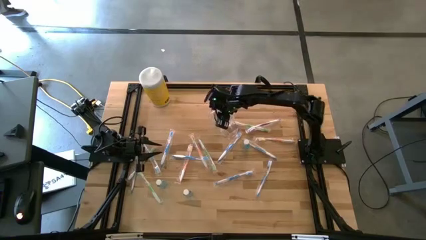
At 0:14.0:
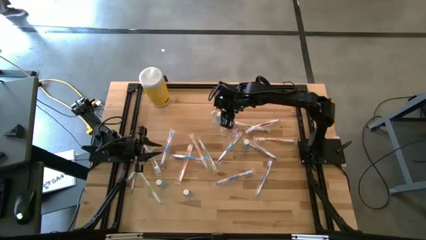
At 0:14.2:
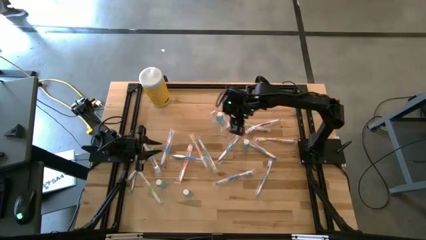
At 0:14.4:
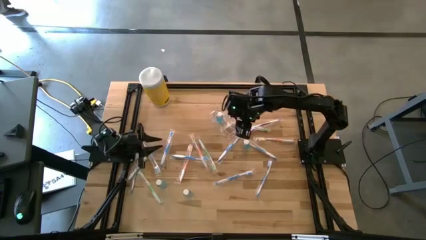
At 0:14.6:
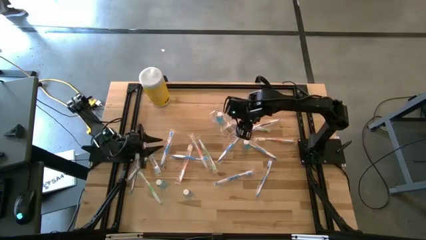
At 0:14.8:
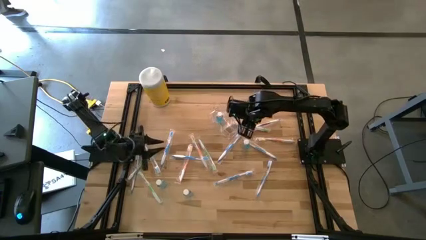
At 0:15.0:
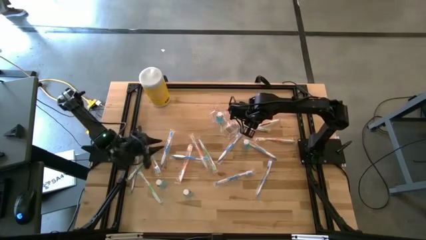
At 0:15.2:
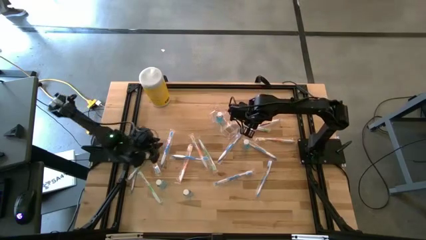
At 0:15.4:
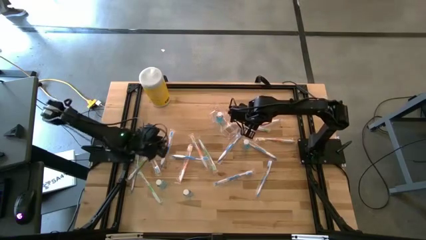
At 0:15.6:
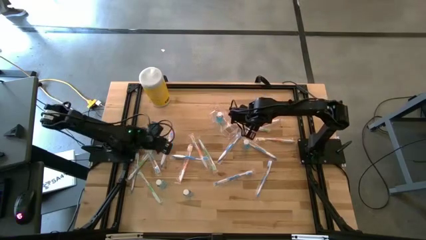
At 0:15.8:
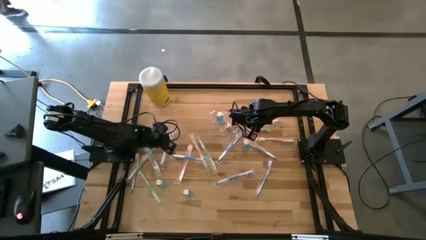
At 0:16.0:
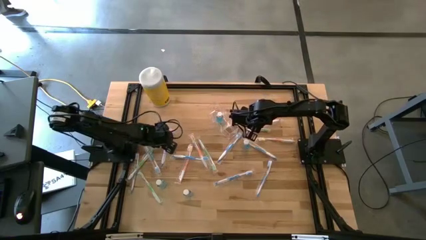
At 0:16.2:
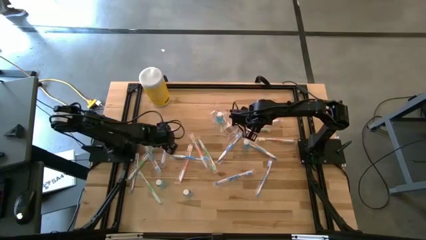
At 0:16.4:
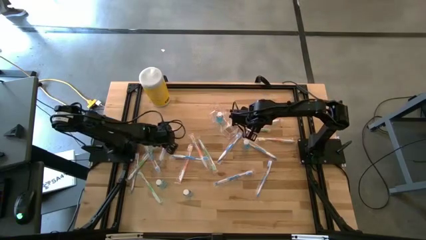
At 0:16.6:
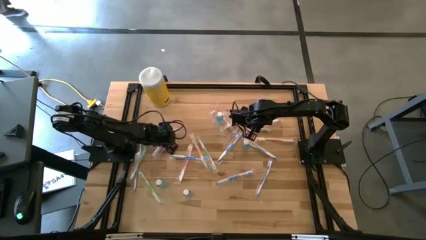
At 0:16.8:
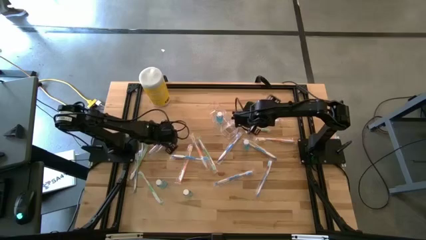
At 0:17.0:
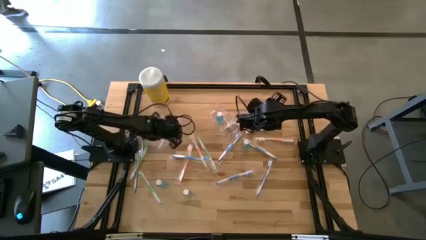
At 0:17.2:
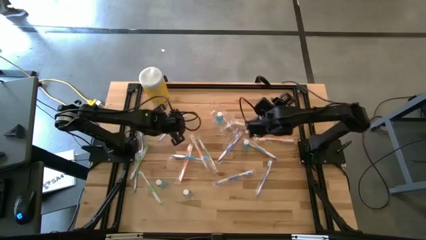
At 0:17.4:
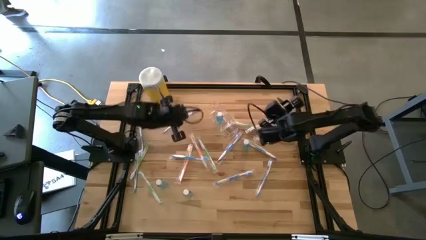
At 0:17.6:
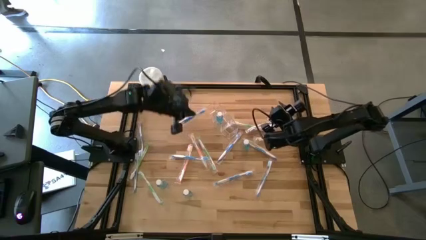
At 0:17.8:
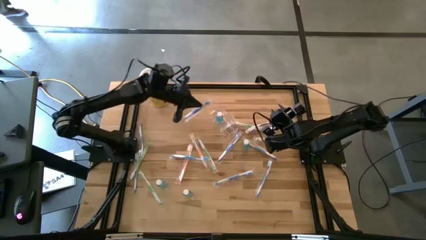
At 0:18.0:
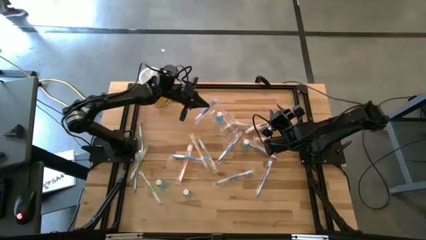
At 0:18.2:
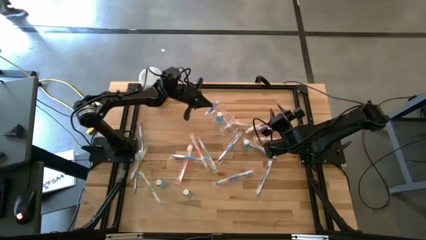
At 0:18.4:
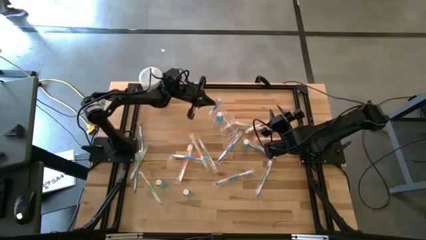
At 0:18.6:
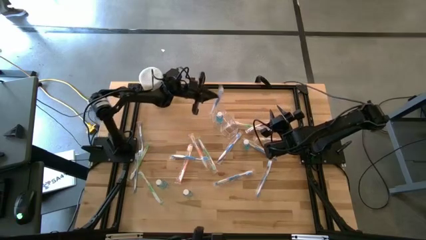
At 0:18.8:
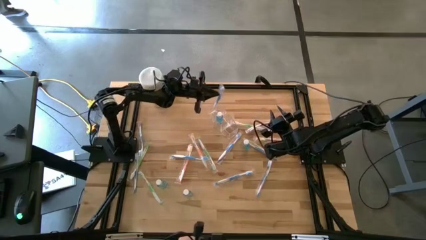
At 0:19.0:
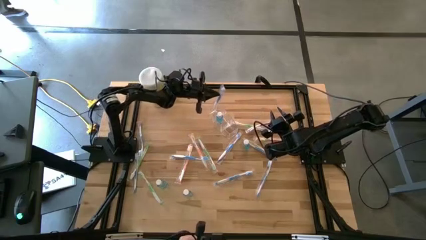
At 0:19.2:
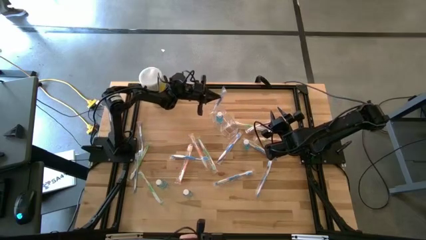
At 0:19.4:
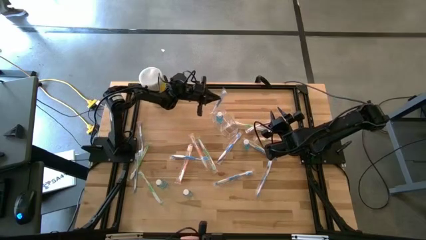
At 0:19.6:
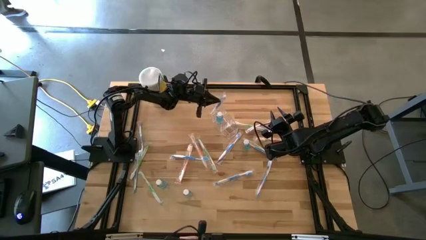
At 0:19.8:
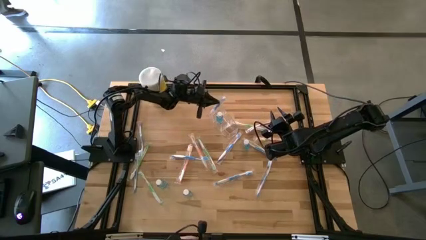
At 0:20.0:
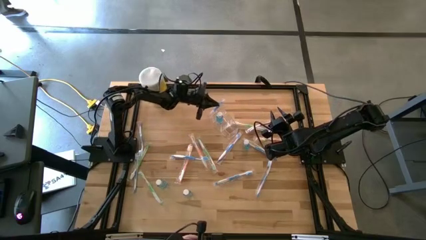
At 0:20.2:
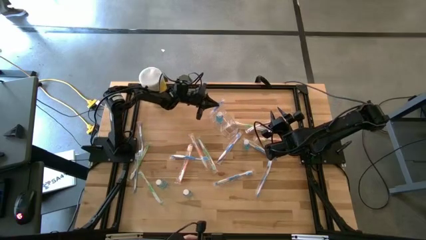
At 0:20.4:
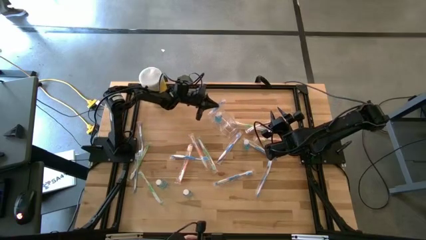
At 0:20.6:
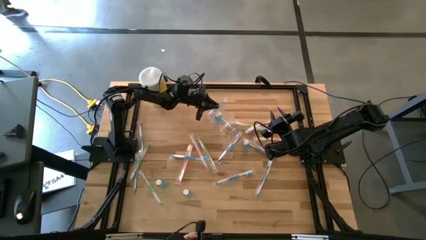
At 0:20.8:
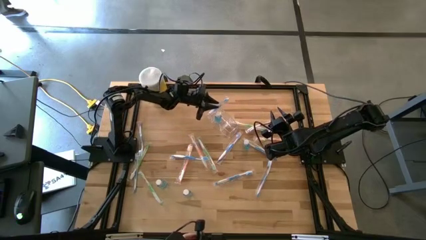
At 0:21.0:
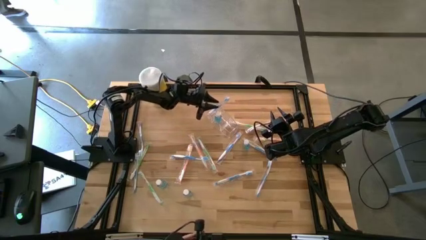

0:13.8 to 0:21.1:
Task: Pick & Place toothbrushing station
Put the blue toothbrush into the transparent organizer

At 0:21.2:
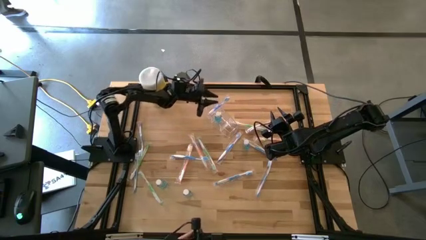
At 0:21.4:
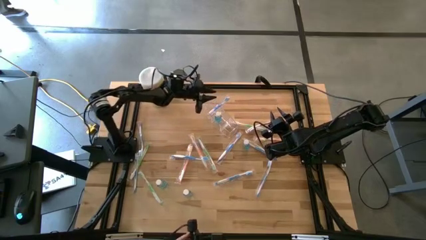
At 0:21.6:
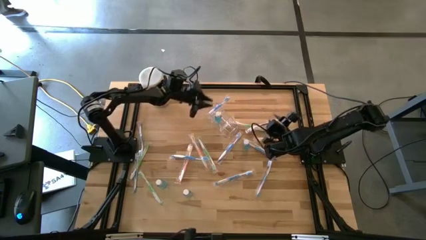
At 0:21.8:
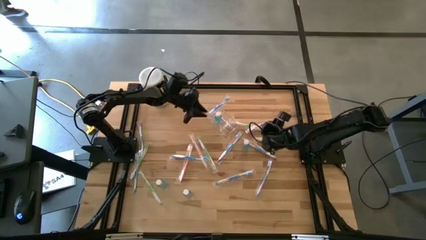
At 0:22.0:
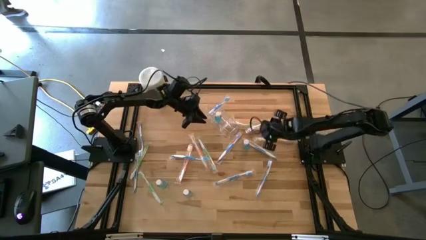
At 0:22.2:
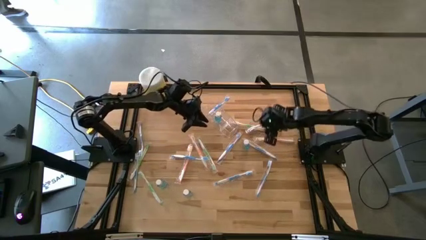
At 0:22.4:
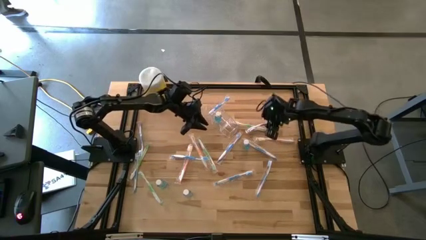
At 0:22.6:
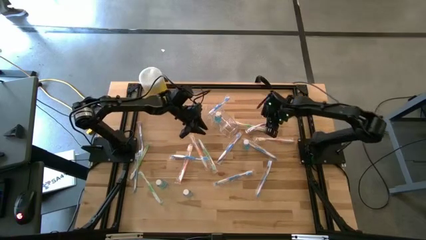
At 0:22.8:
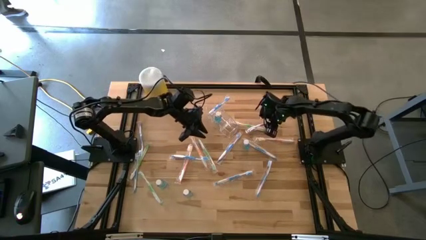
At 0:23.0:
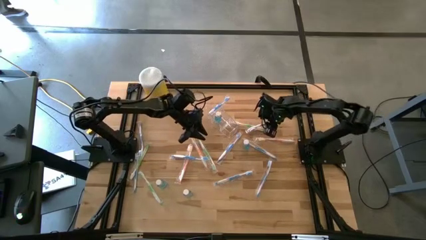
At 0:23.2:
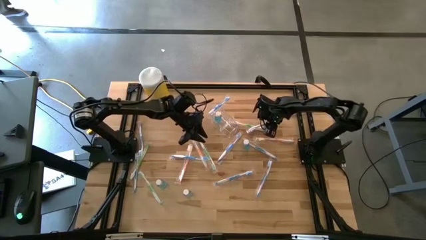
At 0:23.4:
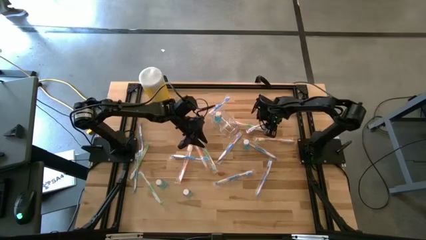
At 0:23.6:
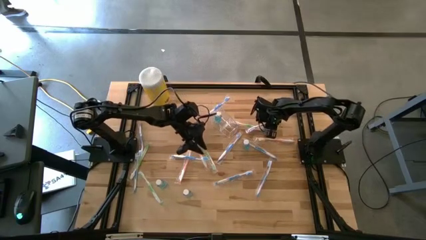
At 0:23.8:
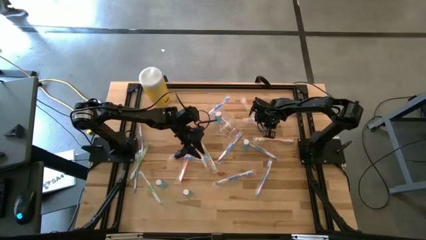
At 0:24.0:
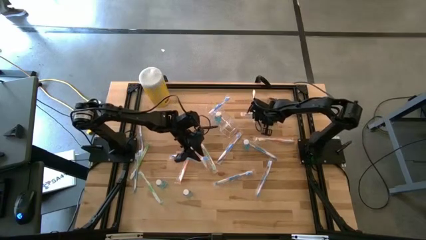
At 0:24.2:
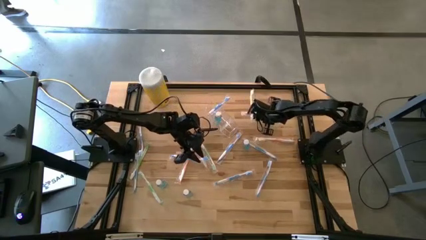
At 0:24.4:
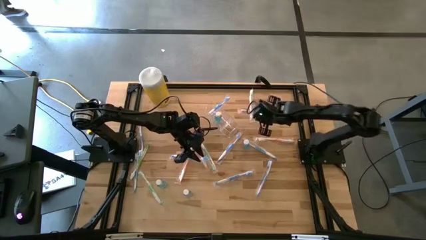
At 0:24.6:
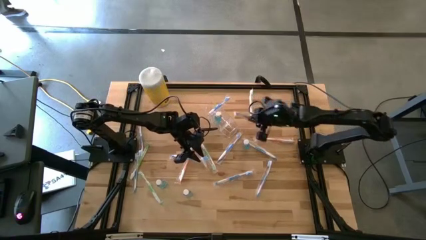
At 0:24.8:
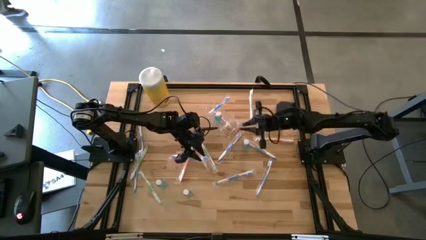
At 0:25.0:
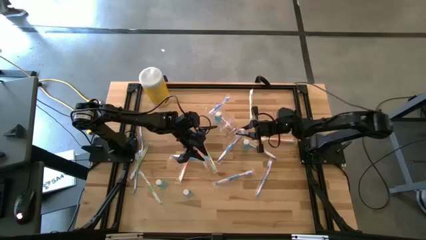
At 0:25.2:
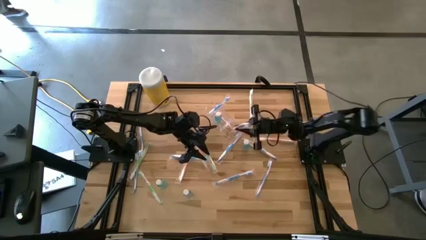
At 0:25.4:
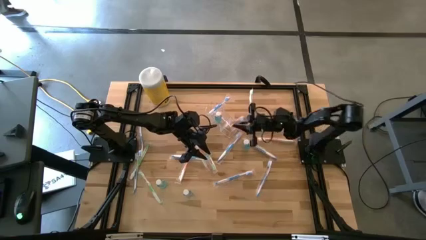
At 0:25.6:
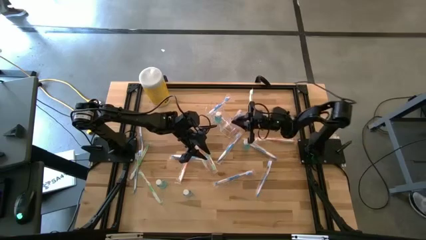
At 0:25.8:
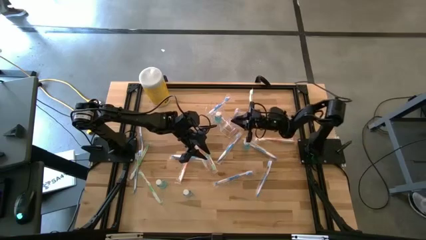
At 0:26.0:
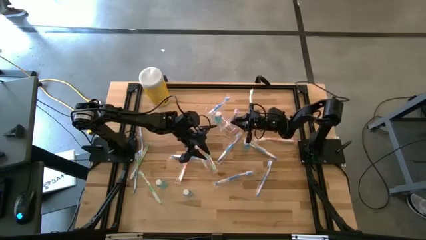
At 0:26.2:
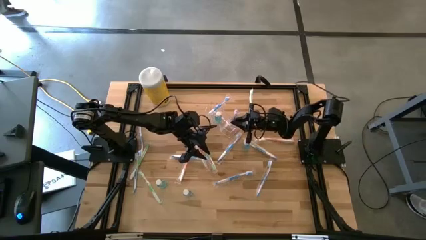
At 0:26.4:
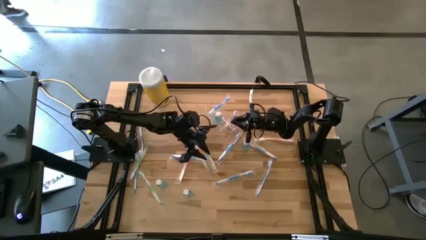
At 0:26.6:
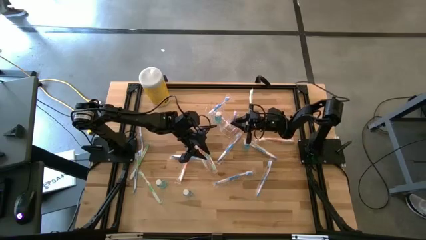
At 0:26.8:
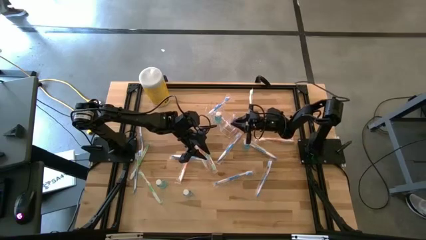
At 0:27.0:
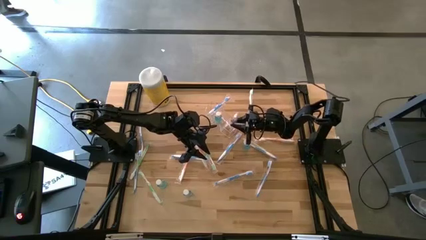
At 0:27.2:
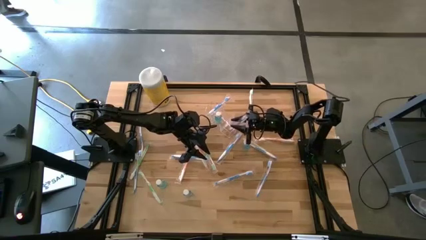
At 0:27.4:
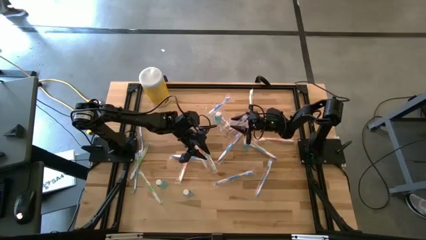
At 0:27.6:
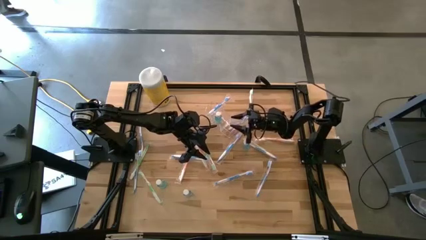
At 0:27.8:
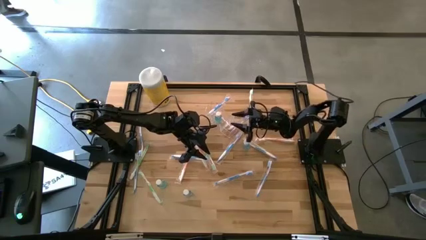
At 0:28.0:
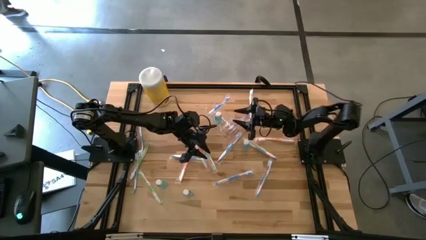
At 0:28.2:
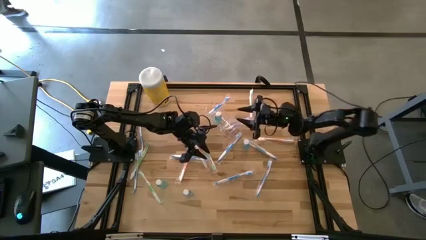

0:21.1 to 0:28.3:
Put the purple toothbrush into the transparent organizer

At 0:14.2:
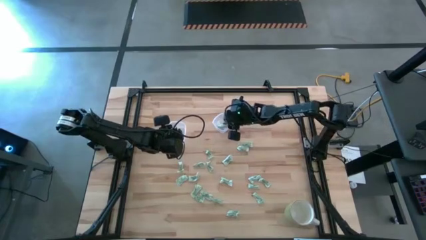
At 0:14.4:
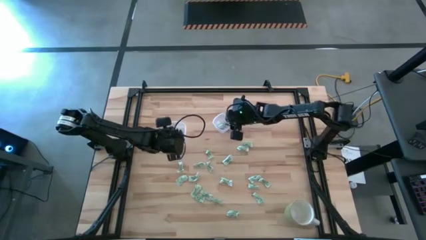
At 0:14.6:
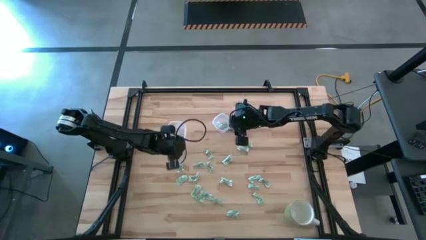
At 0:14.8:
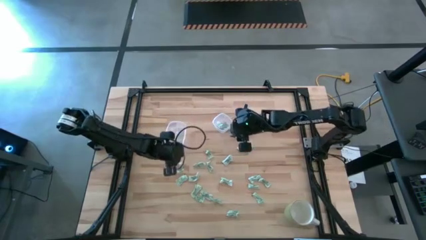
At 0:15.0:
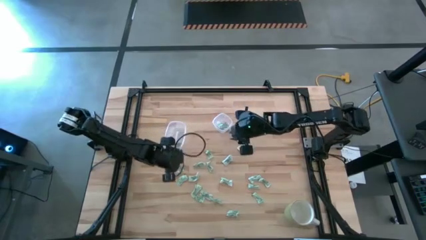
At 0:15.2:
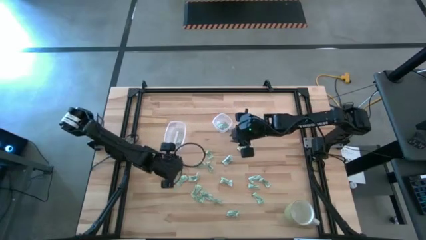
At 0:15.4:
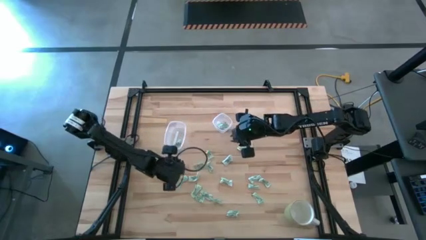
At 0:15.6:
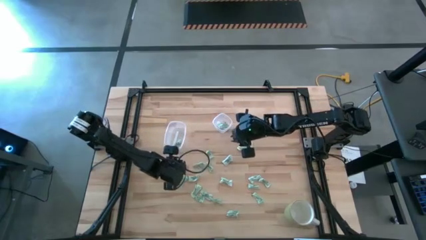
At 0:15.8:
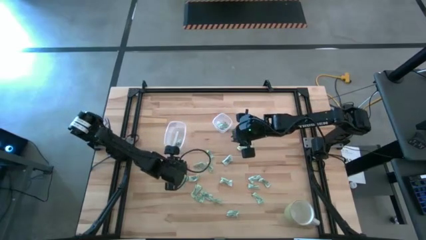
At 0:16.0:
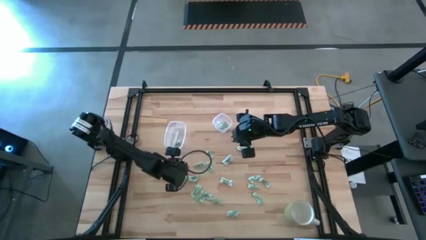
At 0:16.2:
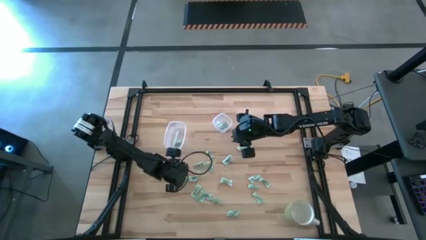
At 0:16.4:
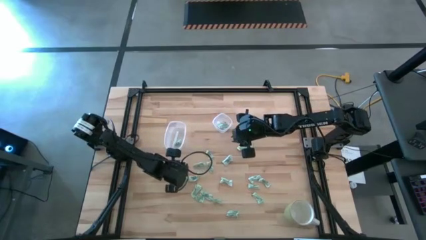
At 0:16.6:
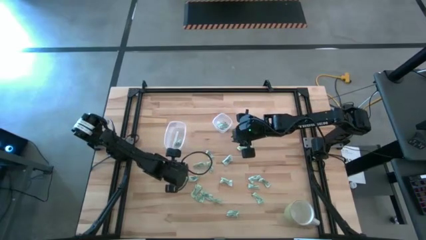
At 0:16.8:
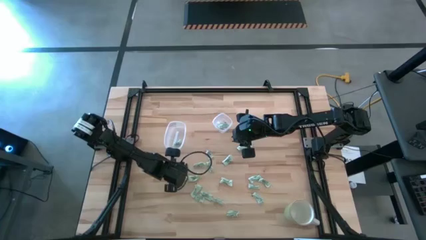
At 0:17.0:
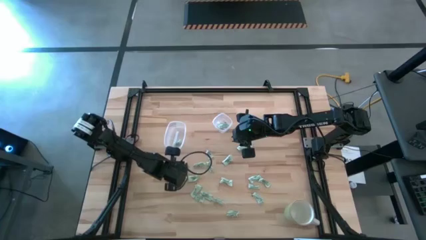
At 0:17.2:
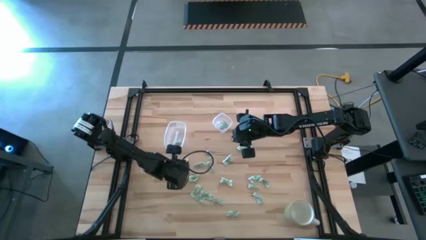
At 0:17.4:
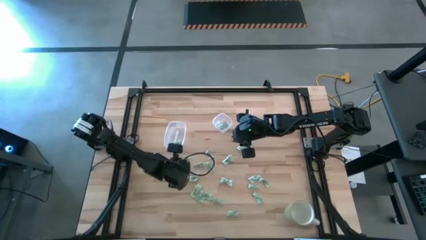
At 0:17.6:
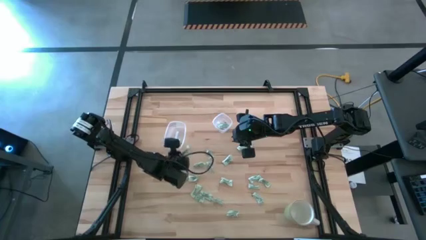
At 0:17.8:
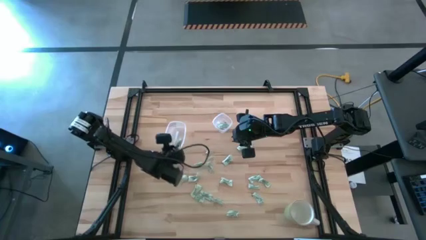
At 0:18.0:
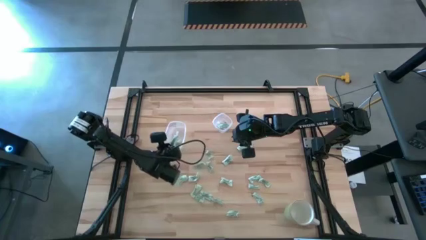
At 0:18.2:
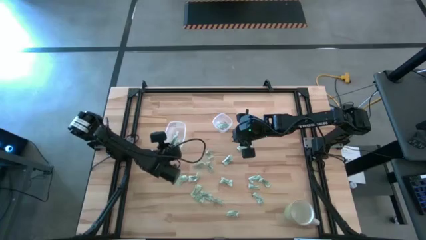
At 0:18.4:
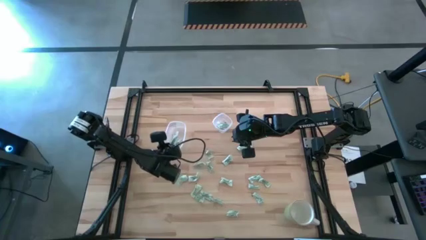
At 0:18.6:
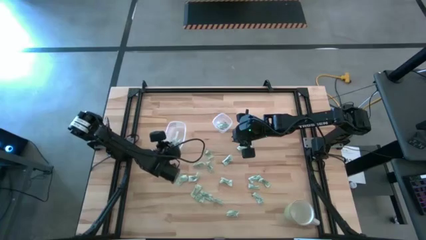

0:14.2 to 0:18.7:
Task: Pick and place items into bin
Put the stevia packet into the large transparent container
